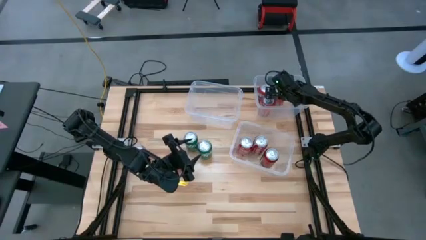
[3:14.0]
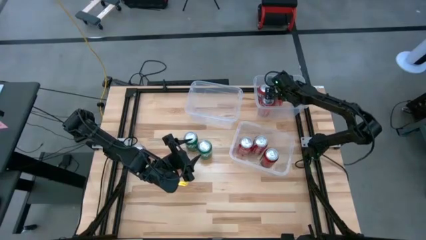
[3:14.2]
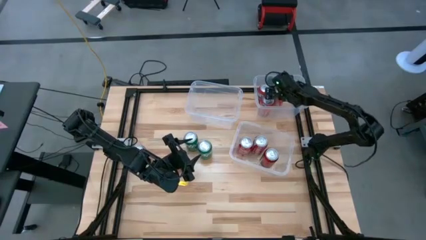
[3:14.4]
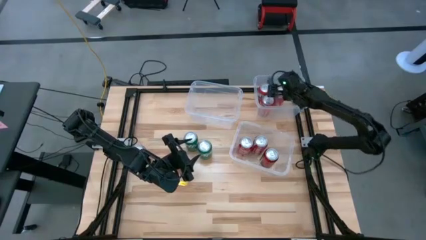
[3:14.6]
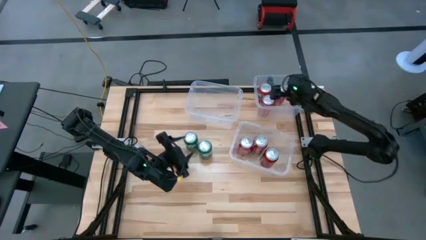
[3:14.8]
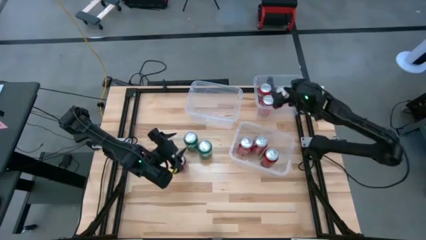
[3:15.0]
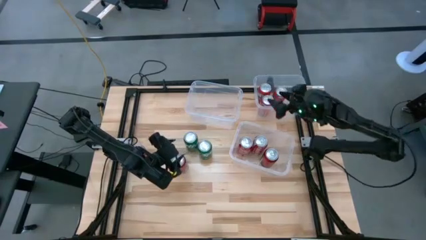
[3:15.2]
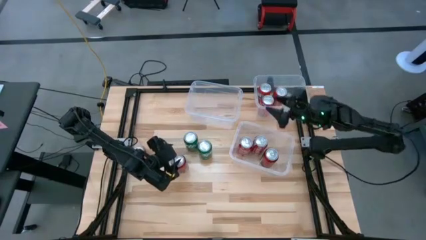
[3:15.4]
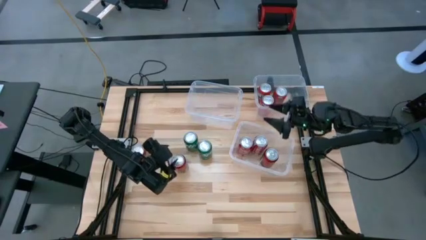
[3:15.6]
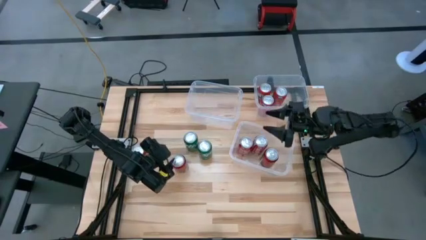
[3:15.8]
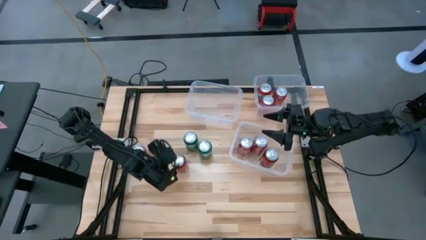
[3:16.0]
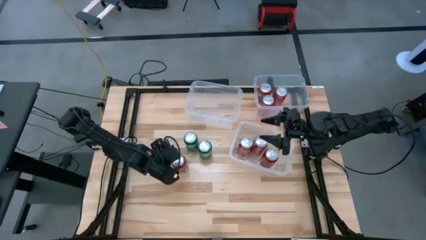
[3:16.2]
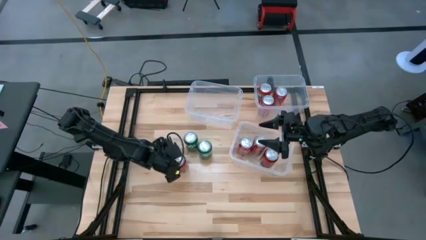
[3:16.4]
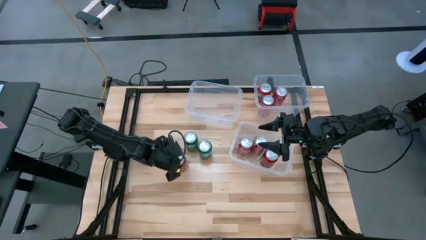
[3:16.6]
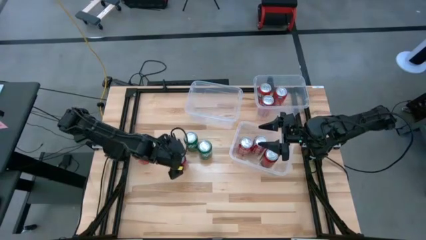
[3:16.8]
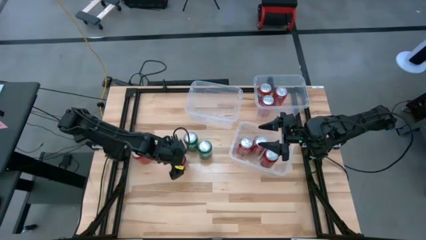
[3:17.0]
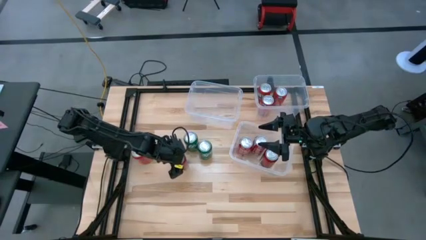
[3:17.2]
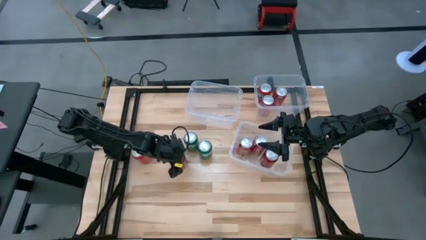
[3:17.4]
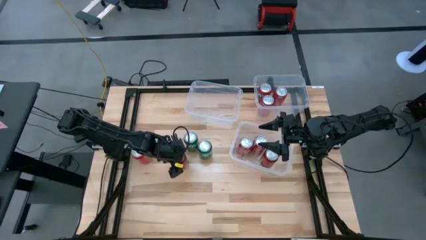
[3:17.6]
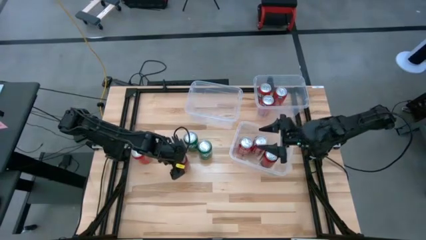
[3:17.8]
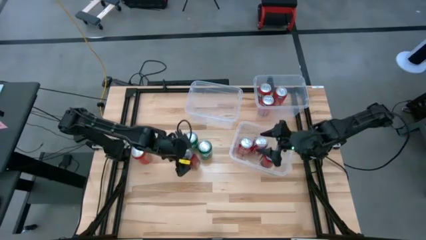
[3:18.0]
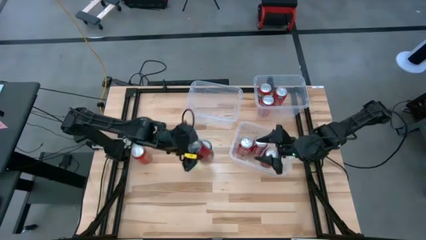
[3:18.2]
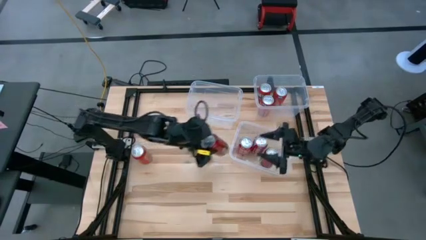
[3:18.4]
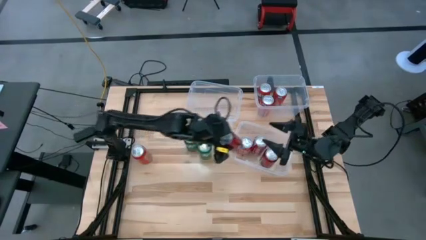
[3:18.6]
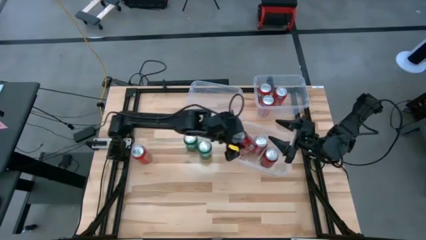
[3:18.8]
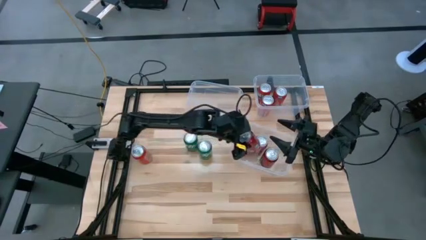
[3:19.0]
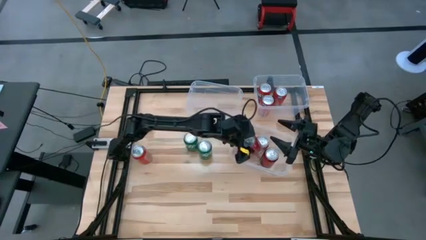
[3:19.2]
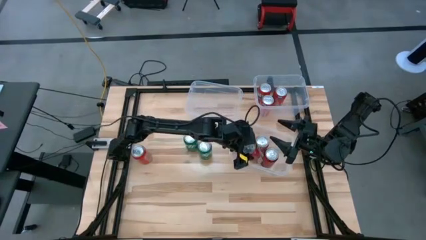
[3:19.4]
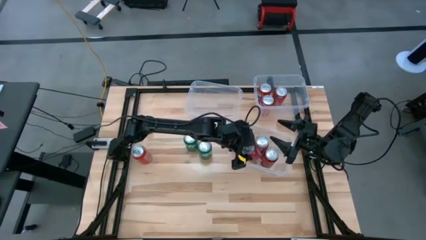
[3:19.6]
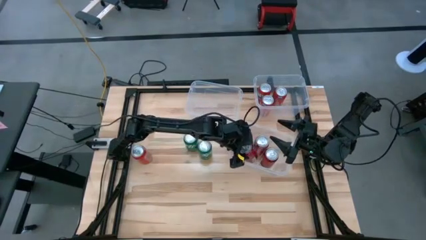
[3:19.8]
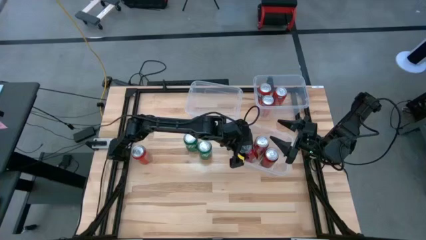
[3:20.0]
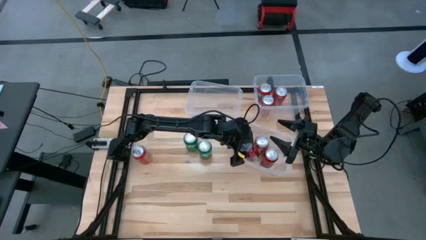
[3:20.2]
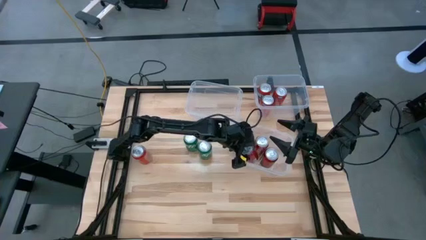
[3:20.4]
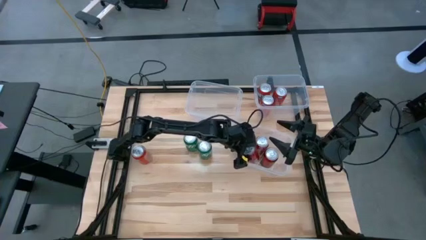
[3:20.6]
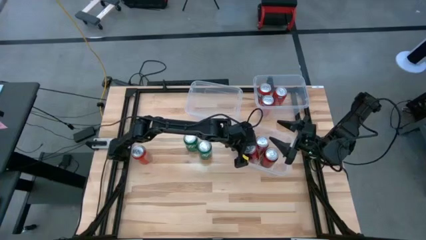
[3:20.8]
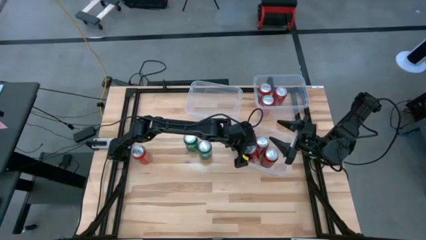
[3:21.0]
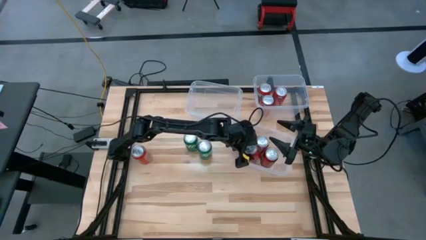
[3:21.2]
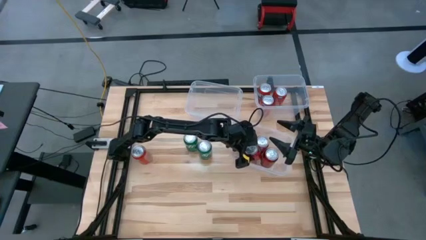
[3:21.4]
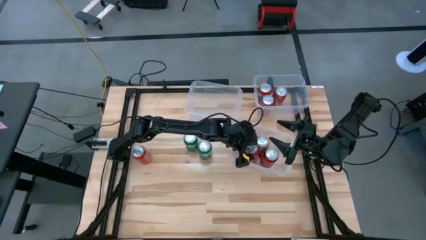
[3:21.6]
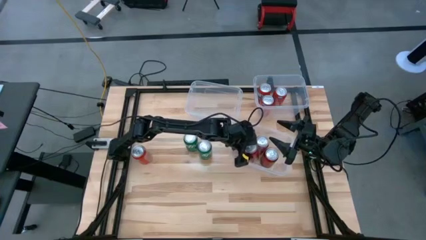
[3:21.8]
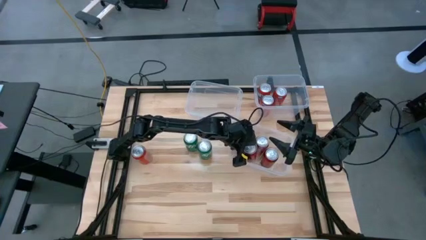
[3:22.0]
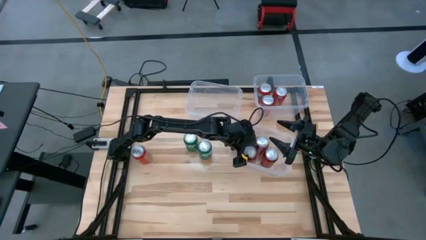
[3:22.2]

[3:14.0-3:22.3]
Task: Sort soda cans
Put the red-black soda can into the bottom transparent bin

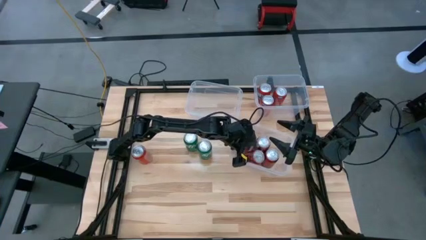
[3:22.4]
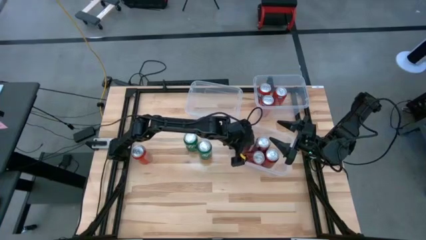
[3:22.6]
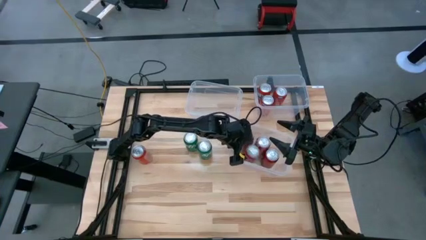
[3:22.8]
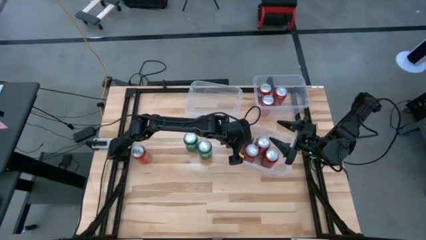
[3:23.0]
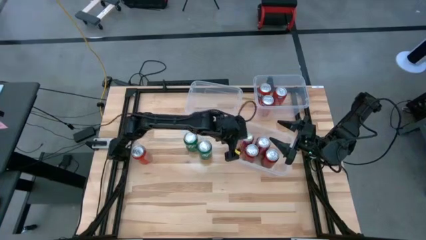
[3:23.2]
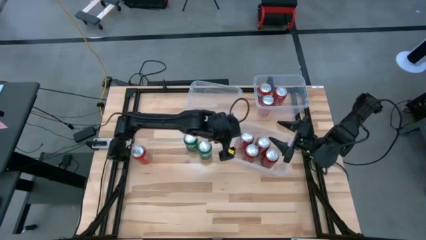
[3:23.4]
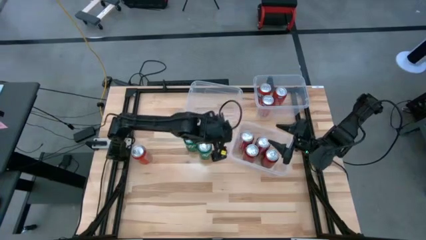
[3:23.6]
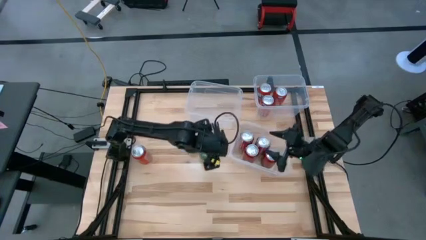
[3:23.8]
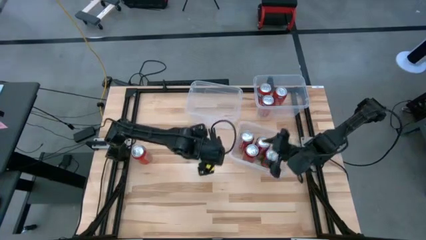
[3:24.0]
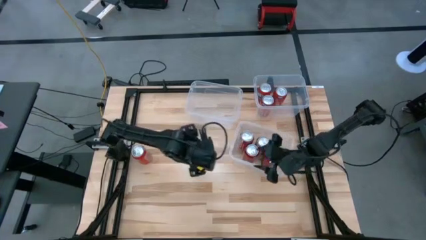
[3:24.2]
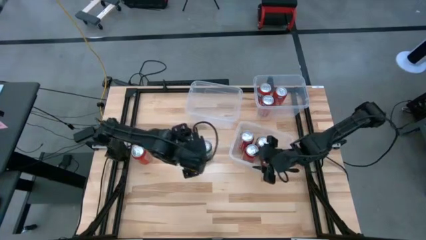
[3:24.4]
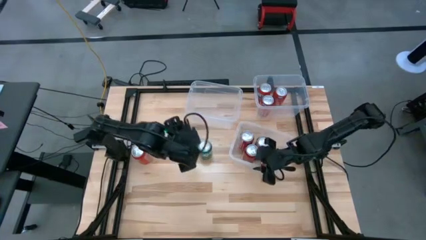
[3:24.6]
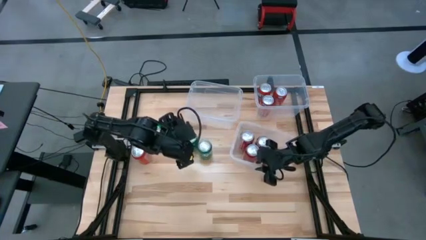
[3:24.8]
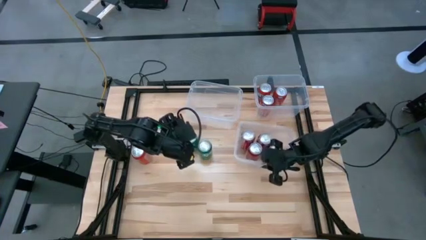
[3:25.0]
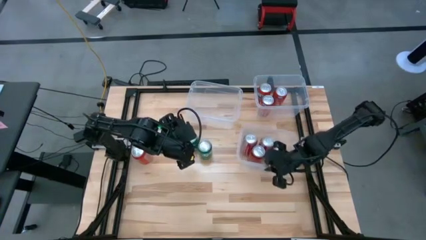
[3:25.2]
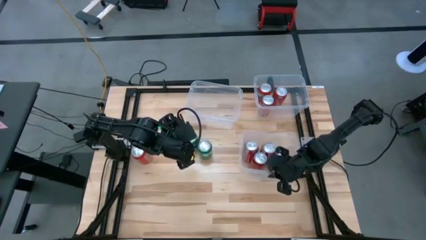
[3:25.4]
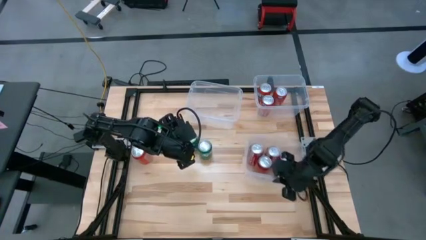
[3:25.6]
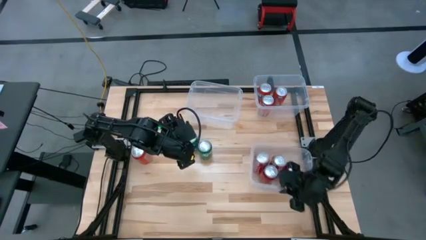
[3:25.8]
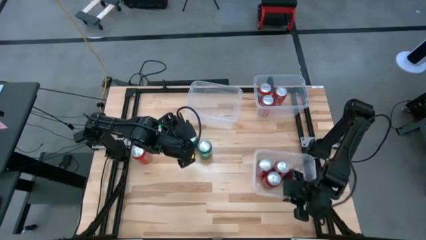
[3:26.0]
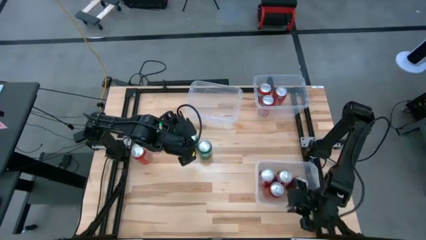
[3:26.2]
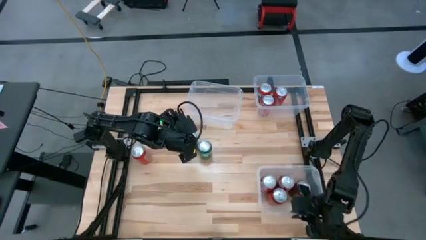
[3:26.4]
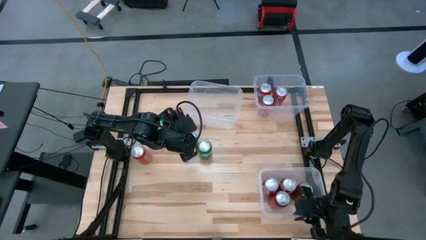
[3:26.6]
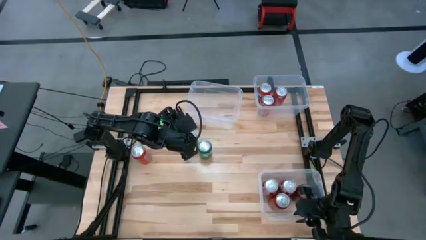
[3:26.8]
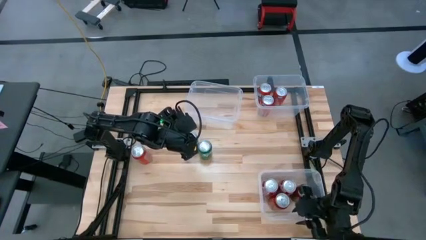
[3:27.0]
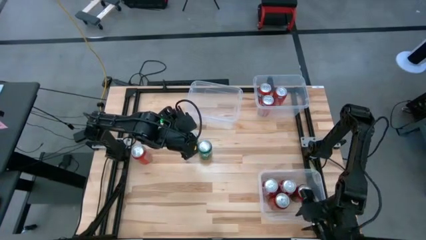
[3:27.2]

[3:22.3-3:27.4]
Adjust the bottom transparent bin

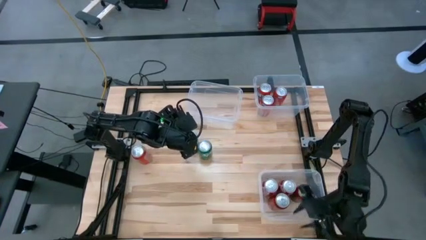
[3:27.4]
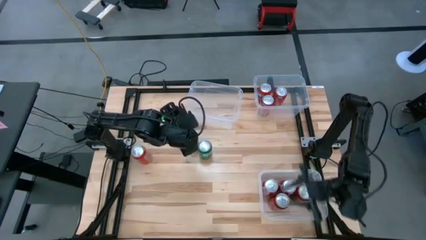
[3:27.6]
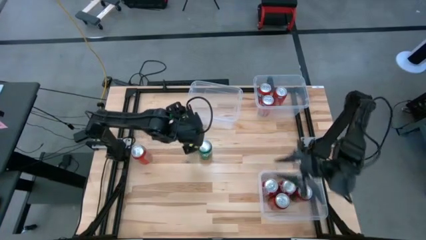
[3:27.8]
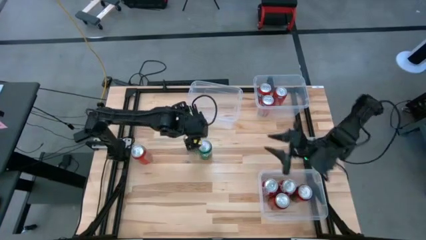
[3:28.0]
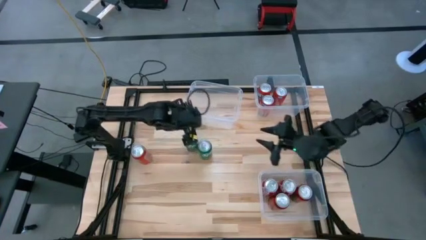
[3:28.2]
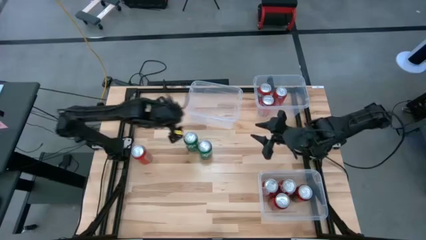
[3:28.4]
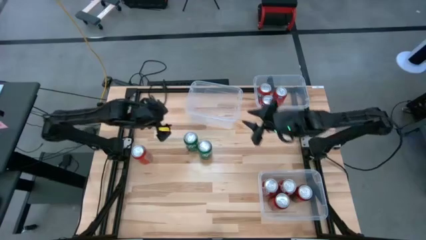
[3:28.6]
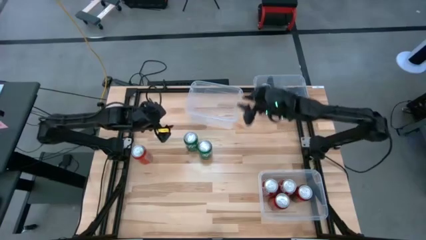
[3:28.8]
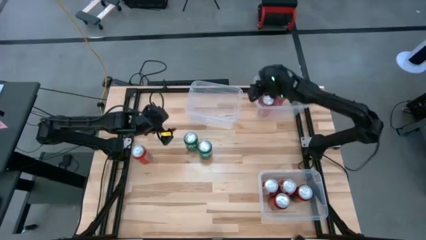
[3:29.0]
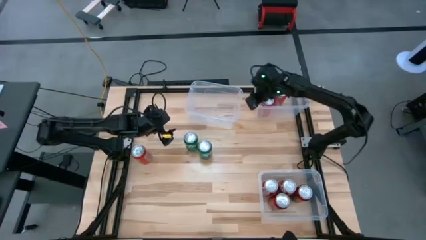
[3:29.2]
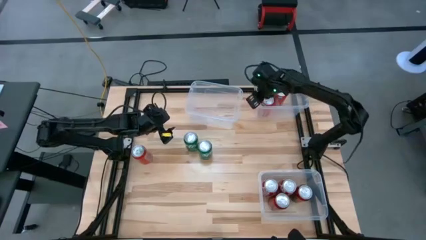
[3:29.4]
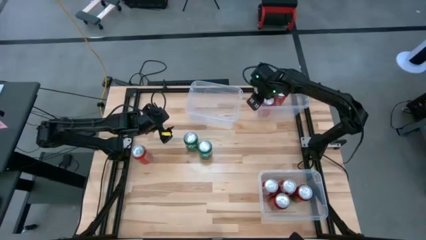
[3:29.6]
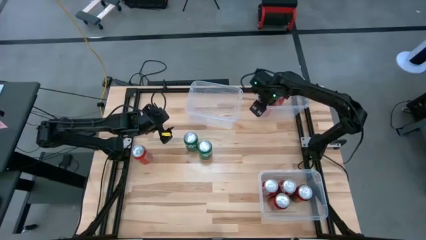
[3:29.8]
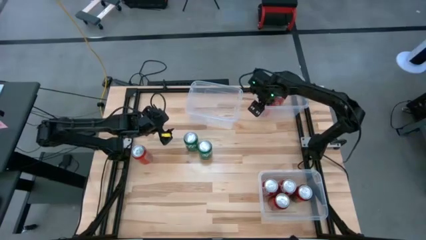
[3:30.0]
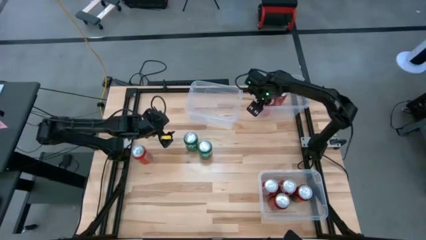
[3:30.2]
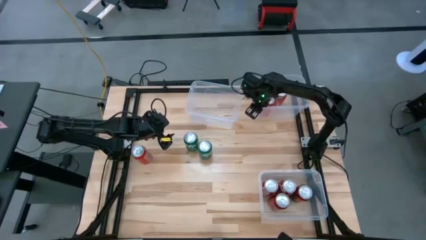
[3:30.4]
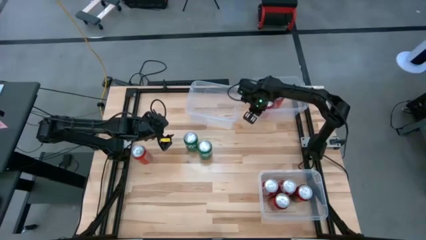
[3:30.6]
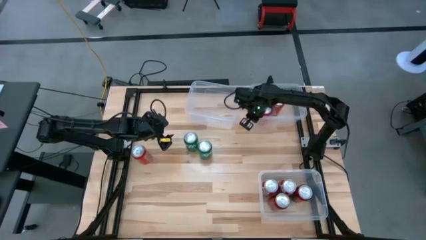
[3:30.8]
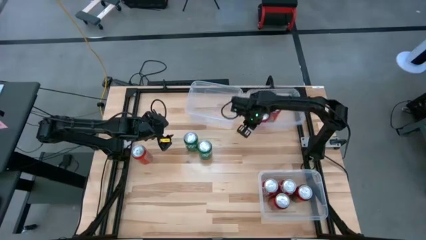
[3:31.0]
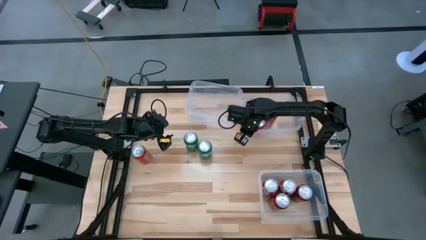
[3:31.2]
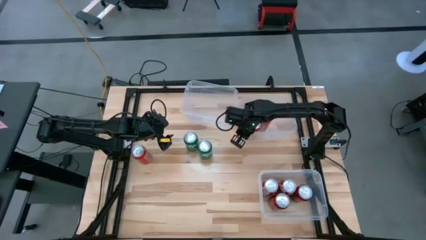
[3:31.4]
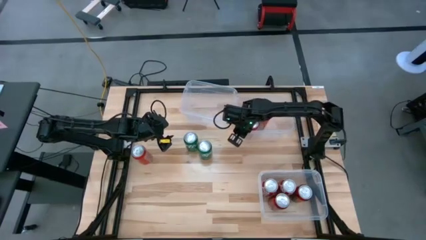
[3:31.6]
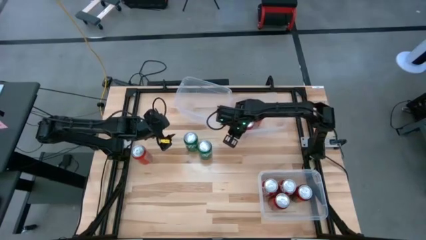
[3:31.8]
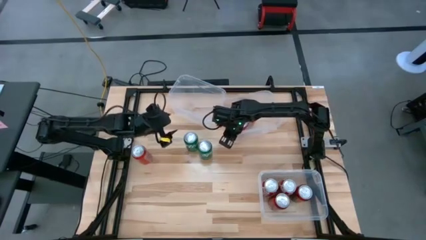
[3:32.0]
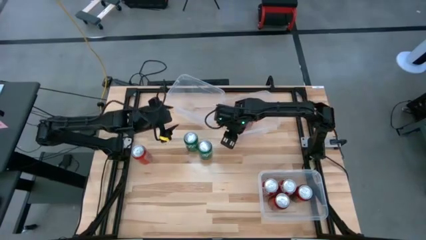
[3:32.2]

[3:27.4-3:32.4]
Adjust the top right transparent bin
